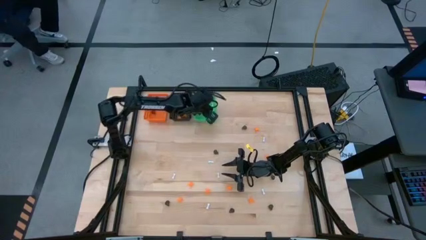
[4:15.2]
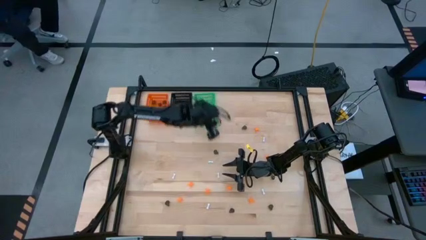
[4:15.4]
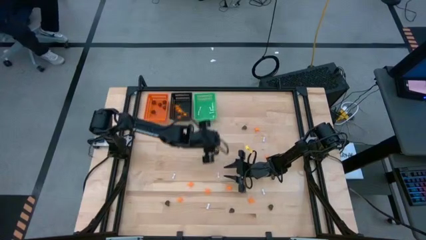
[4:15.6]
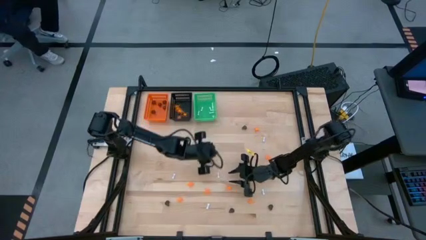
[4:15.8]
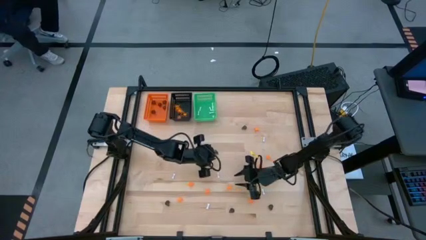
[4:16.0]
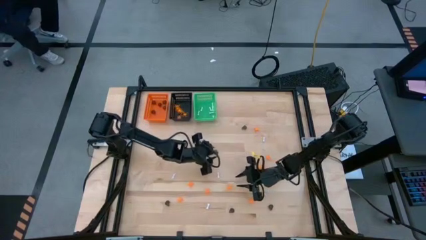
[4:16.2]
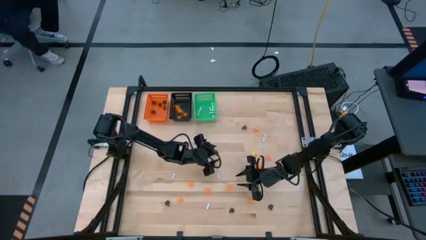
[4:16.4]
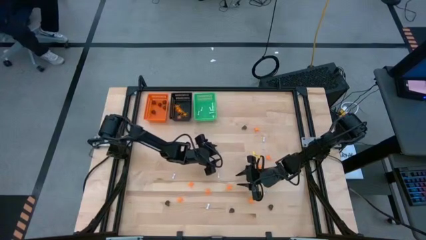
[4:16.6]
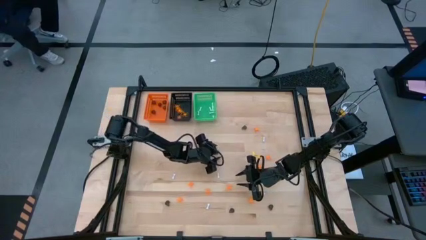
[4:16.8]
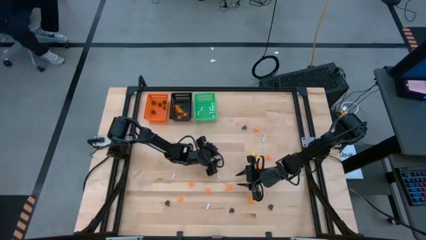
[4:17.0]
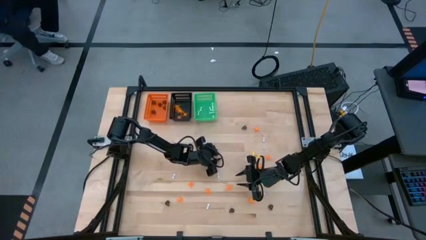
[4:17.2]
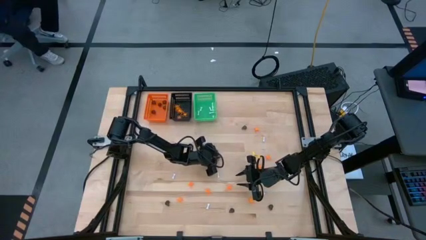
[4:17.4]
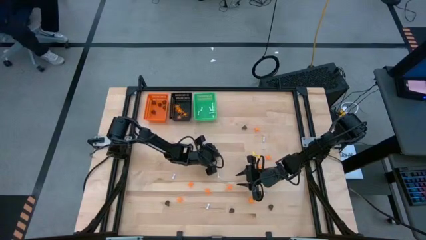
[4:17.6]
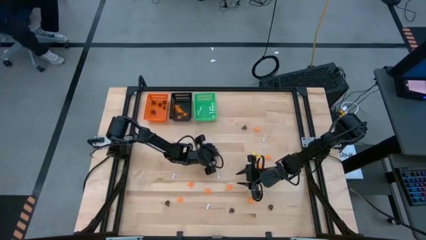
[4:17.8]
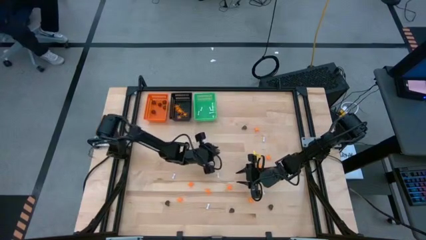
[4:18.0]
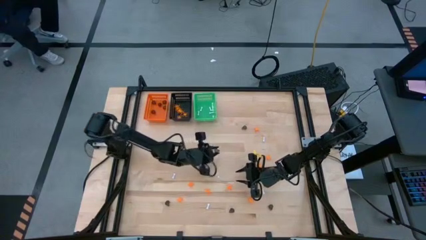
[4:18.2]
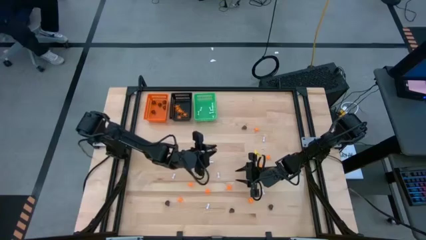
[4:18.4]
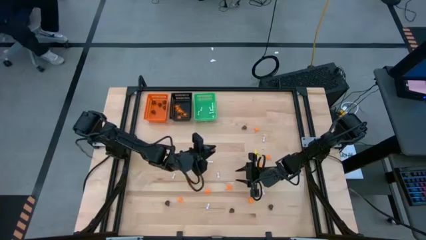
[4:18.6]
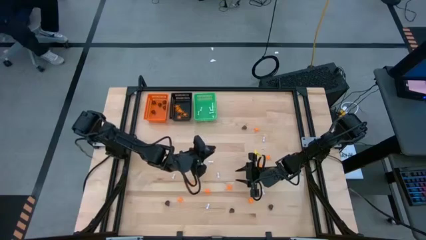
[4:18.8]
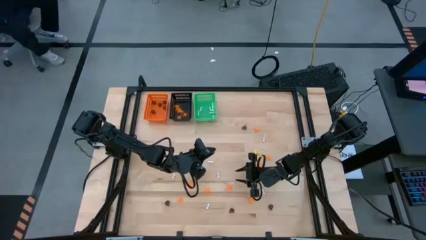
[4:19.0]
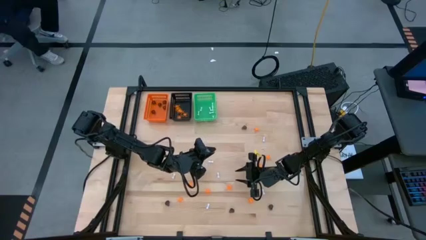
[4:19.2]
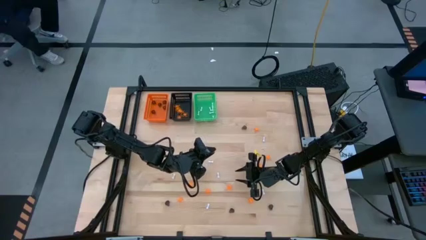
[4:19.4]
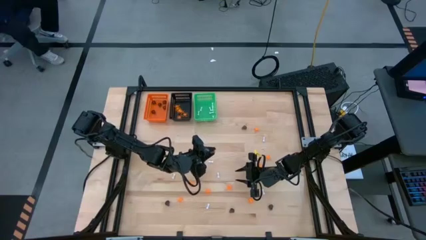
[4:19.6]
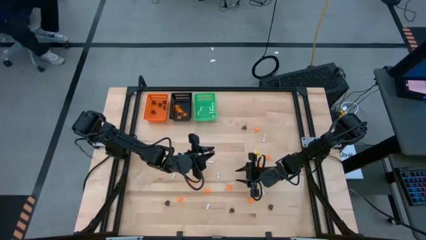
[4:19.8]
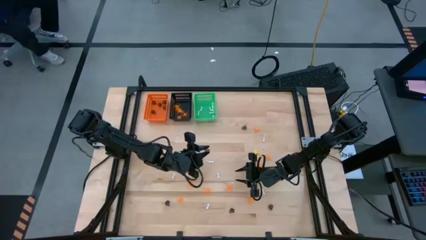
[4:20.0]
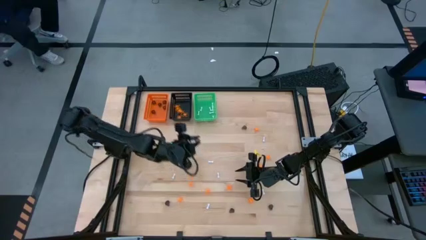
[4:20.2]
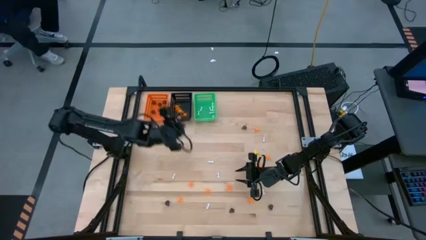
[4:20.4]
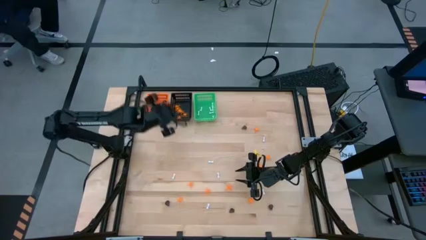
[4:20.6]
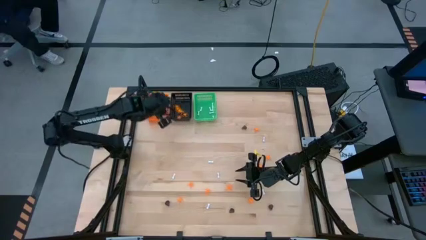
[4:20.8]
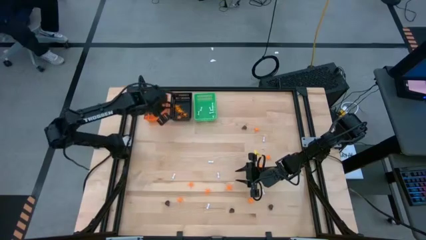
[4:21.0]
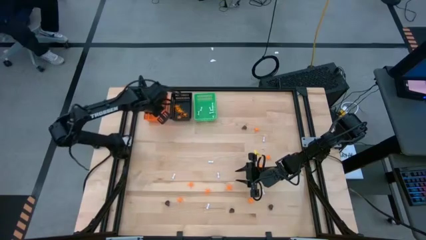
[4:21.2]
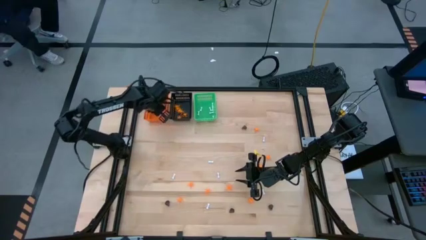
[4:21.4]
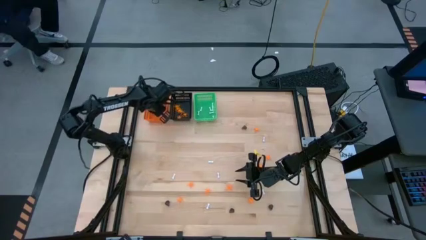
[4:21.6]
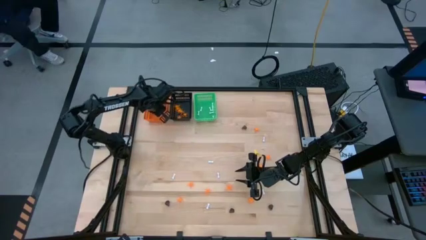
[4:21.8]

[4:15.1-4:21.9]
Task: Sort Halloween decoration
Put the black skull toy into the orange bin

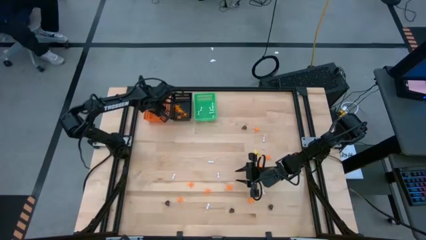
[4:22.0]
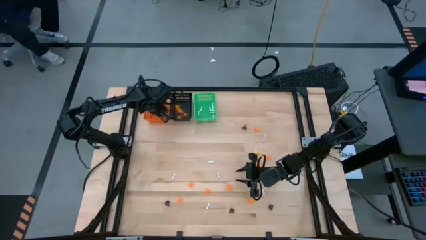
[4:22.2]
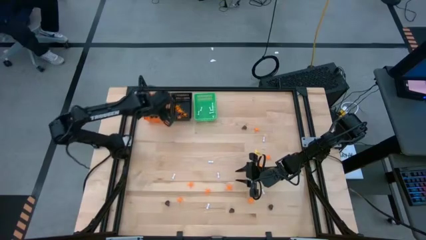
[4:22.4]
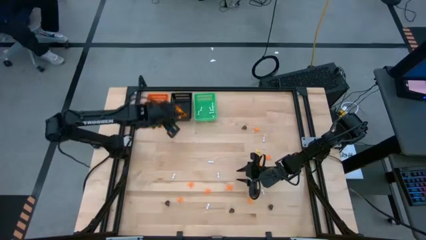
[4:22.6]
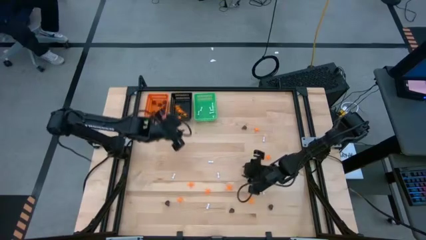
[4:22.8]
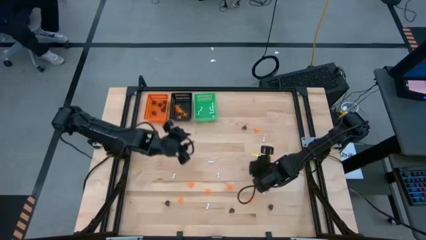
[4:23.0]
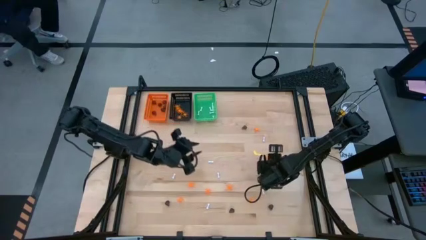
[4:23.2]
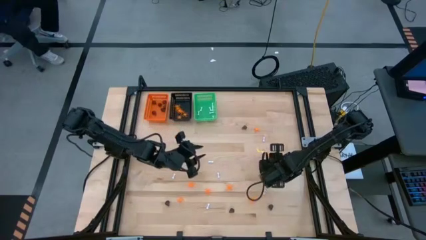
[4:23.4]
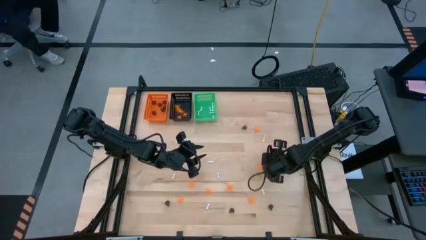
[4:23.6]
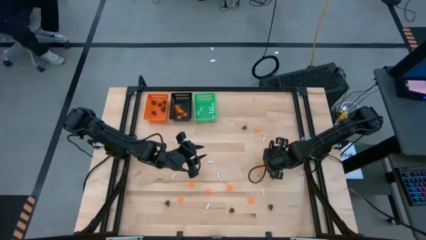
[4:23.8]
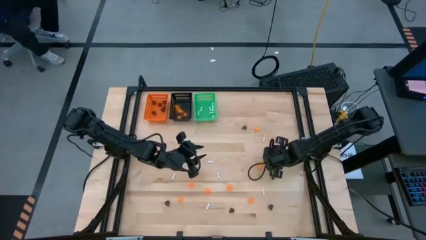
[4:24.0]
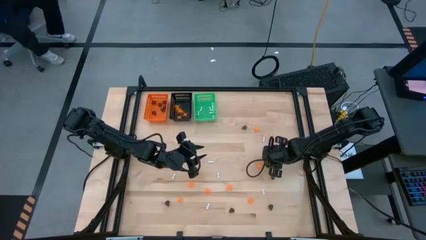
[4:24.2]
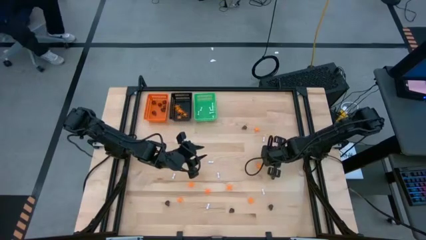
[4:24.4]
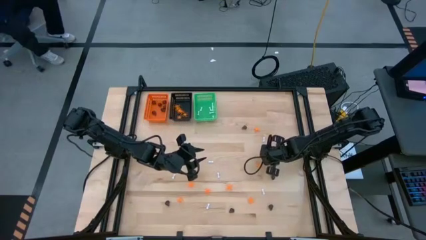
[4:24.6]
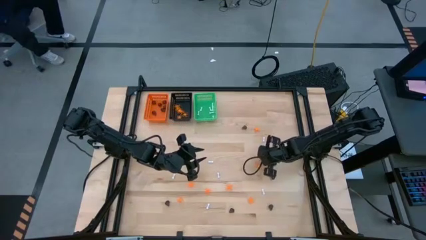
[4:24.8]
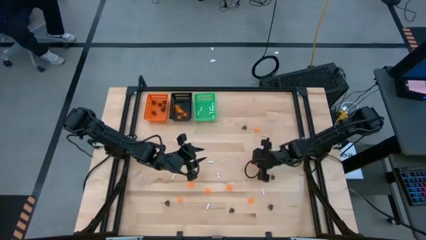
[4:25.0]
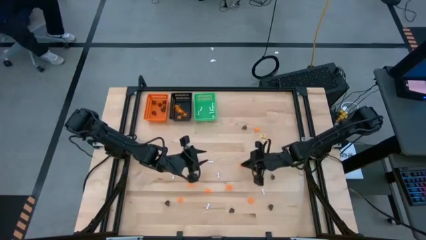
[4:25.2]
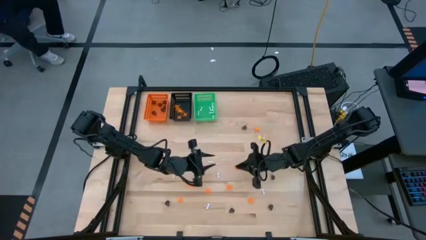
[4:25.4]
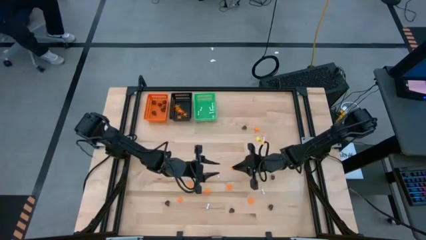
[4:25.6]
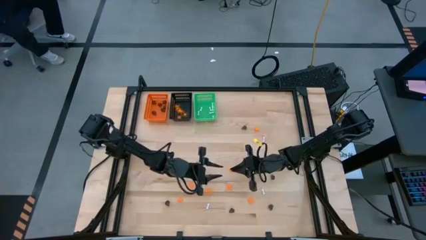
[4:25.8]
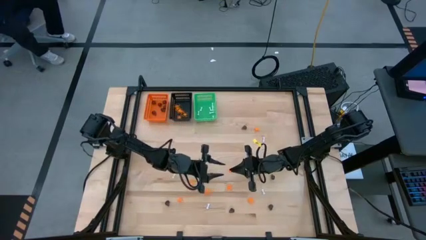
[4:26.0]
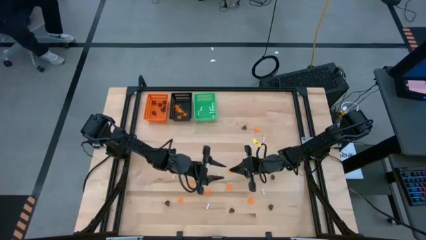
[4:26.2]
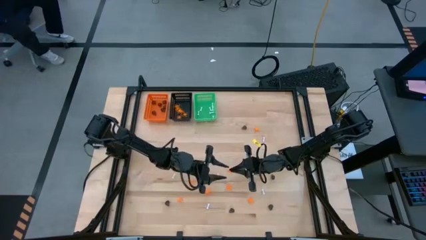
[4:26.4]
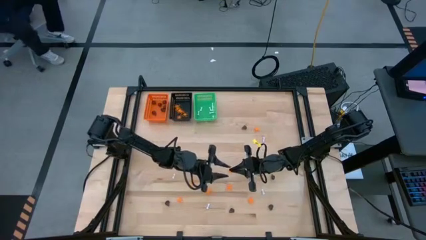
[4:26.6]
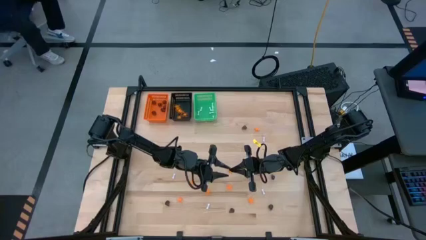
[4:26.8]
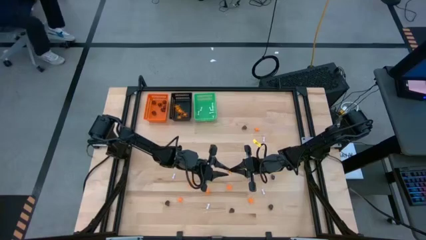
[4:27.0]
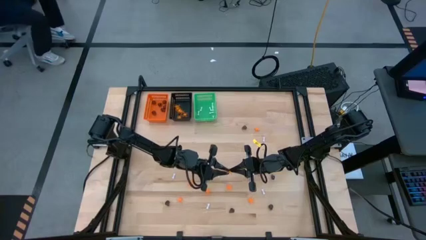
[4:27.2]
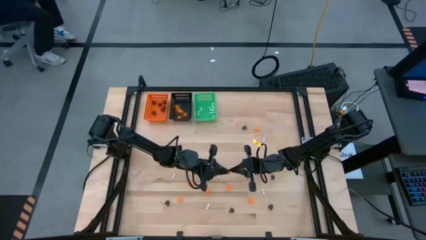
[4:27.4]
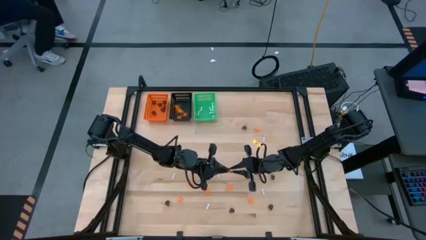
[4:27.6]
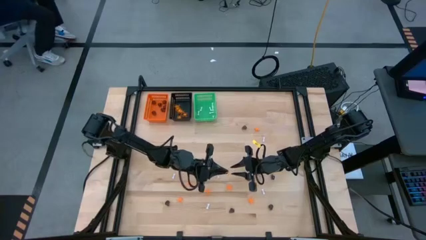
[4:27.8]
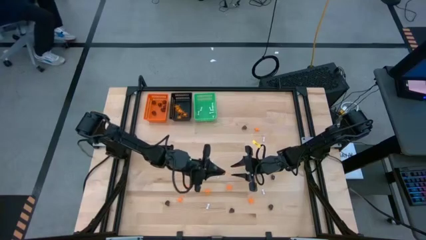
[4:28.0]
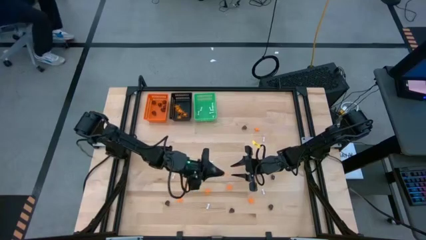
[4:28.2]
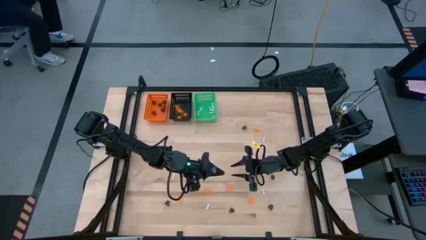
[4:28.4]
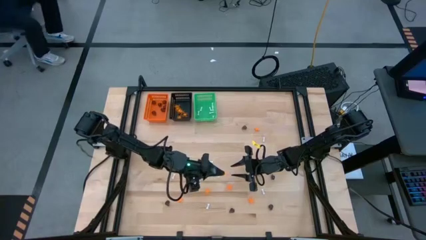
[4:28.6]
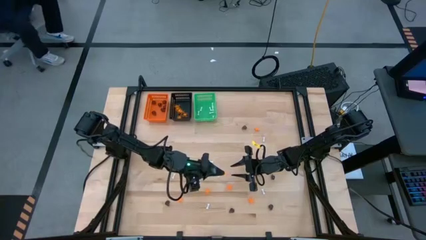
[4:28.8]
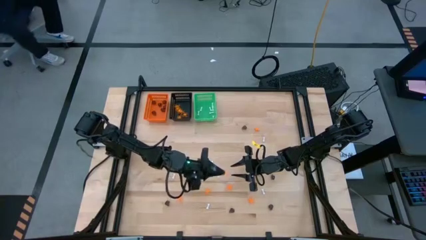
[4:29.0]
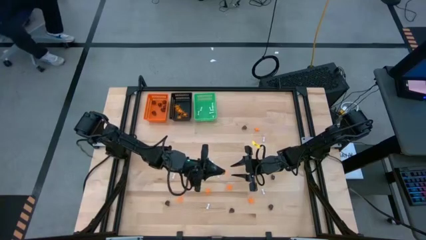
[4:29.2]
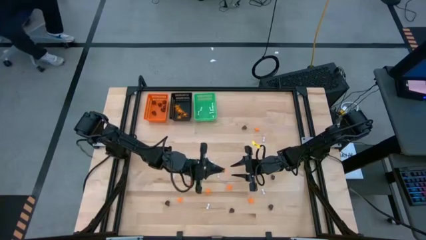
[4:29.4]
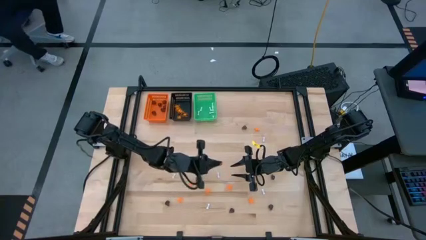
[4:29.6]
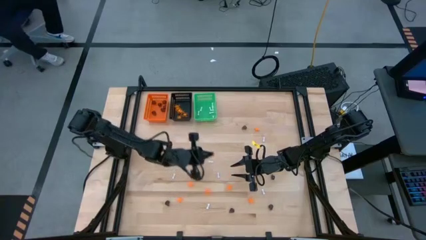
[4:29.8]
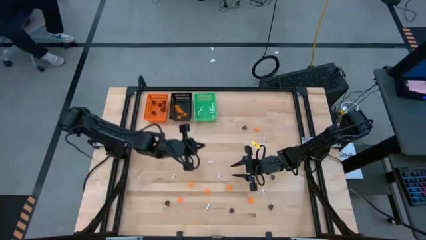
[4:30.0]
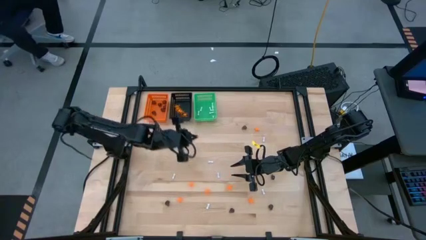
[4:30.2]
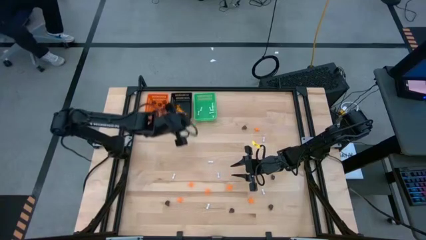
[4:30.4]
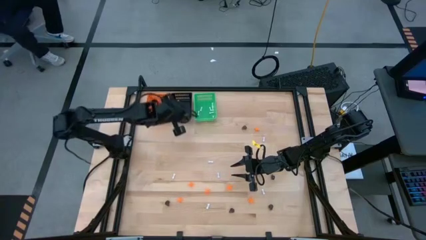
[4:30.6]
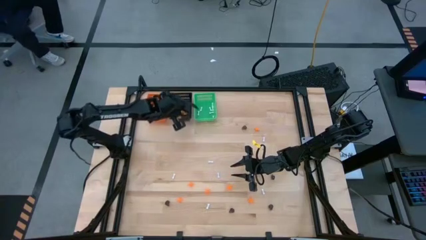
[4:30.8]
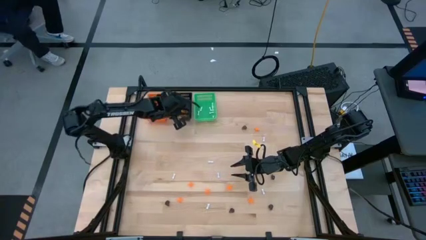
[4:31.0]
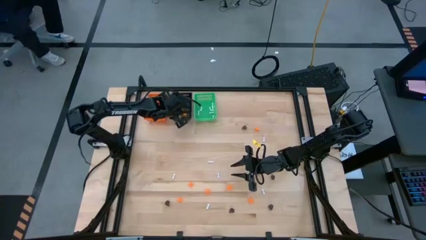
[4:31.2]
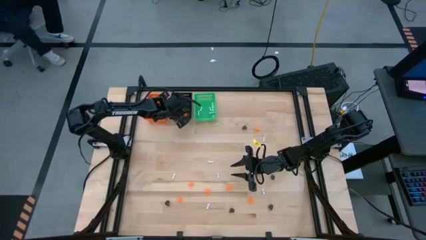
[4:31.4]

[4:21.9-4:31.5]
Put the orange spider toy into the black bin
